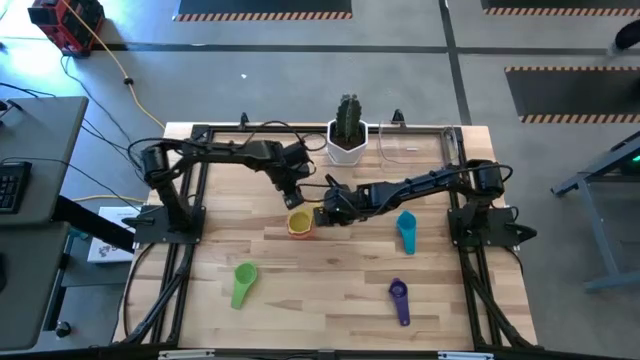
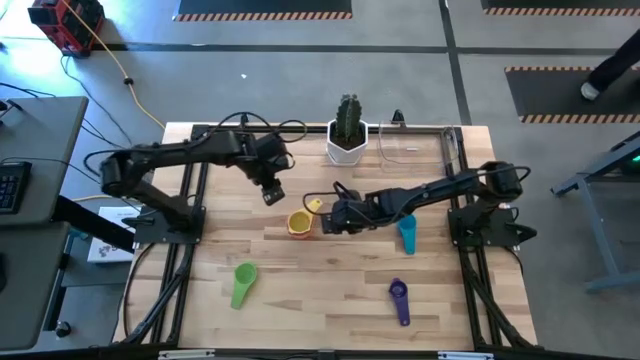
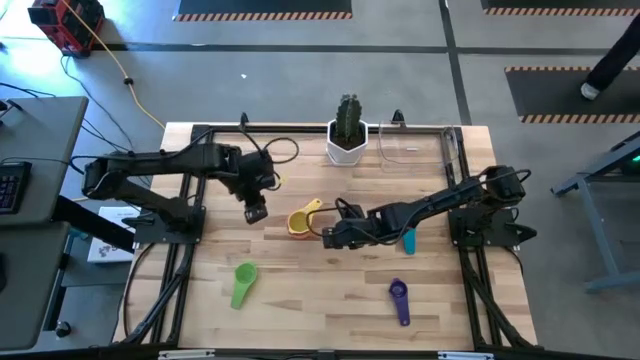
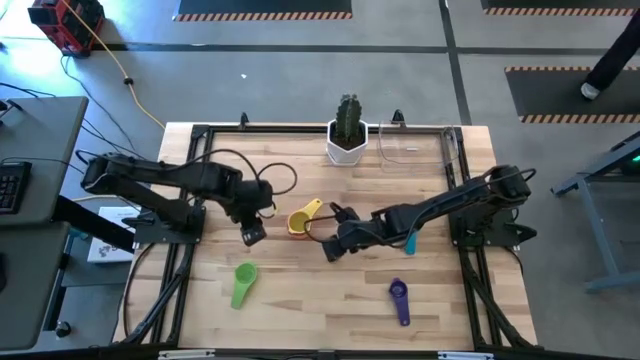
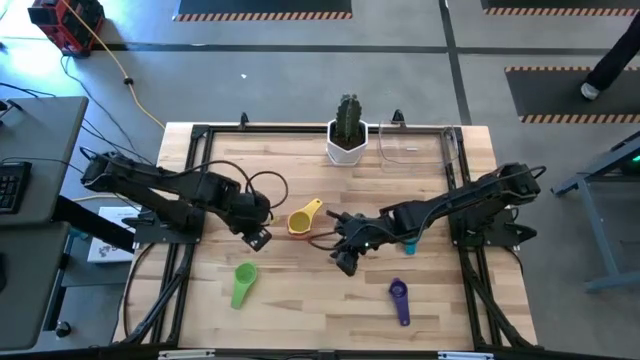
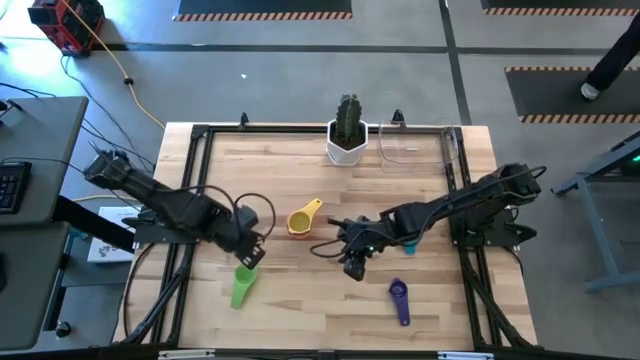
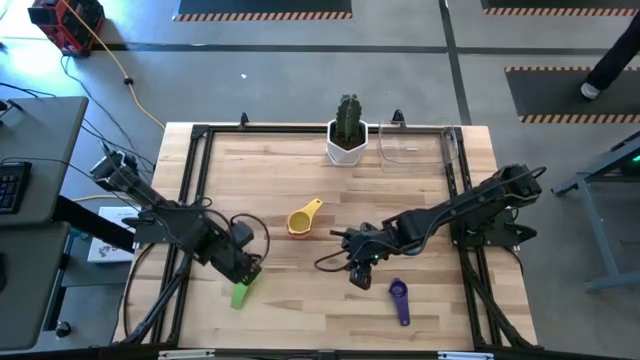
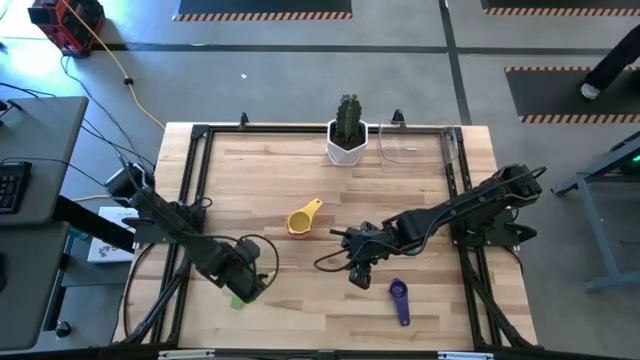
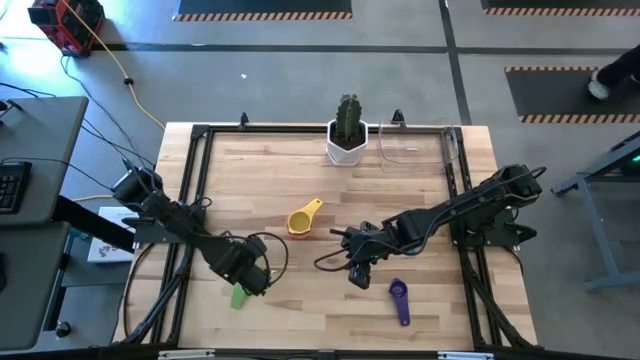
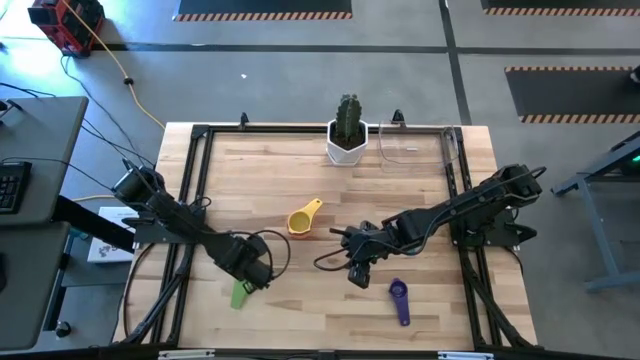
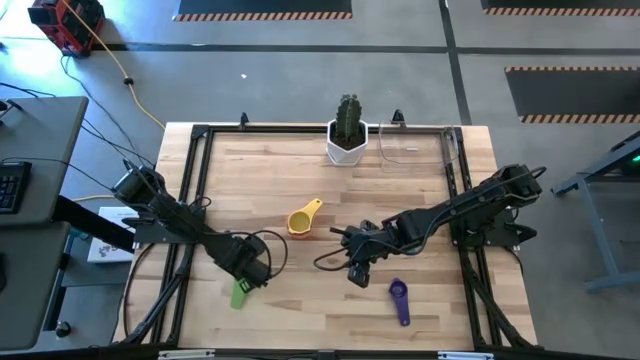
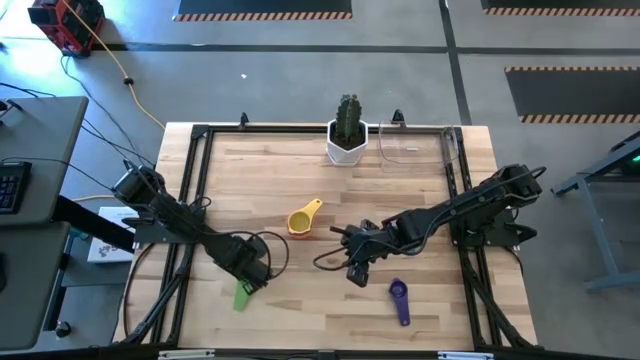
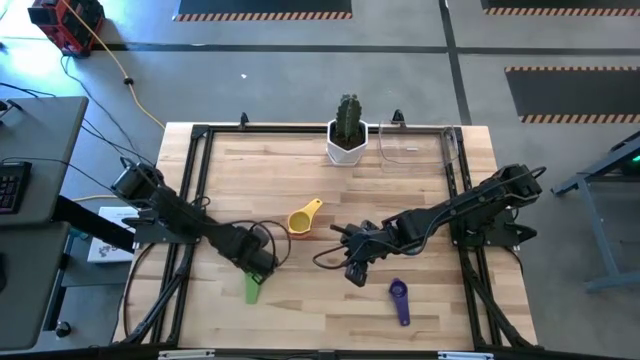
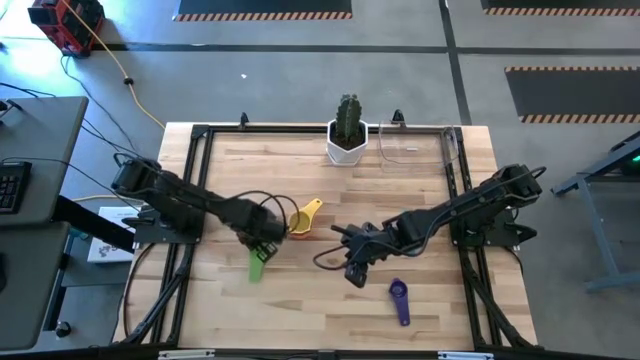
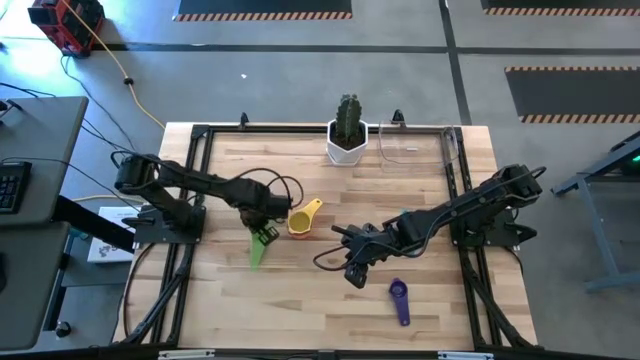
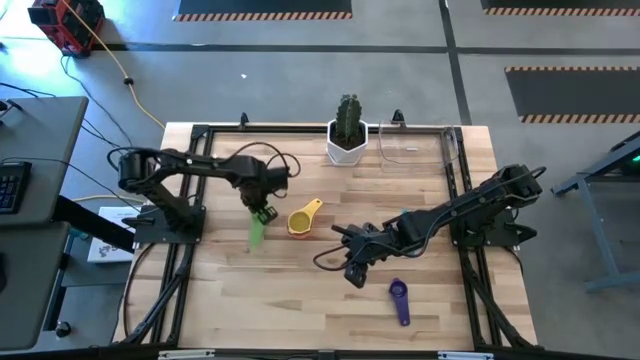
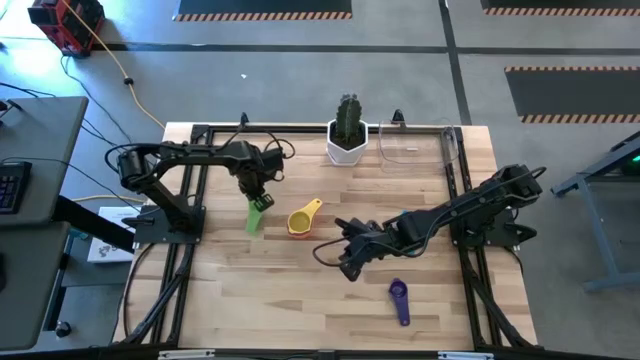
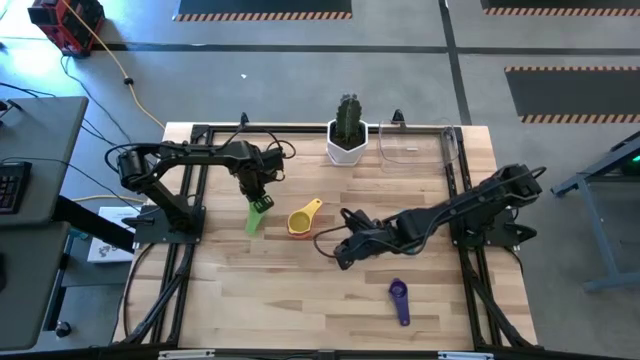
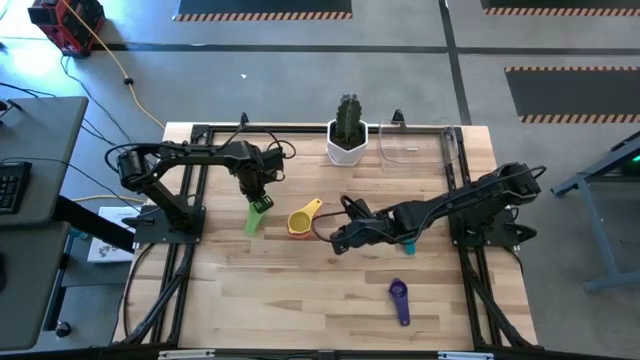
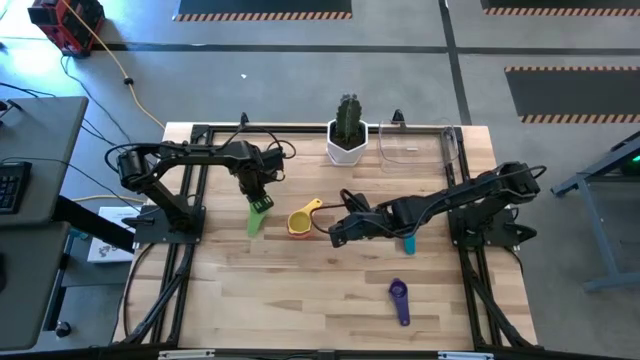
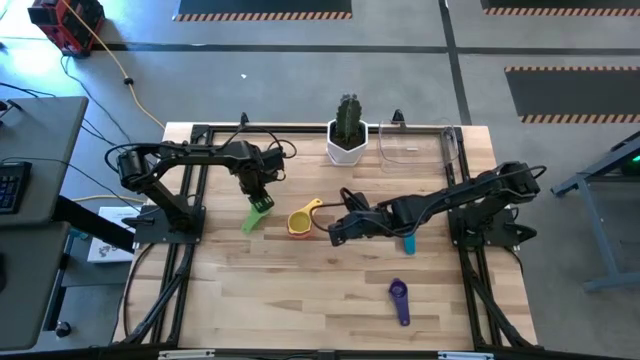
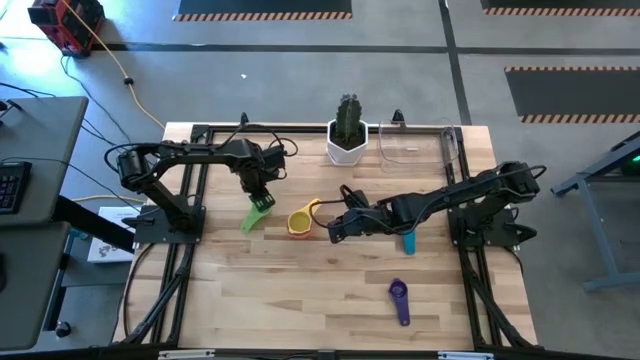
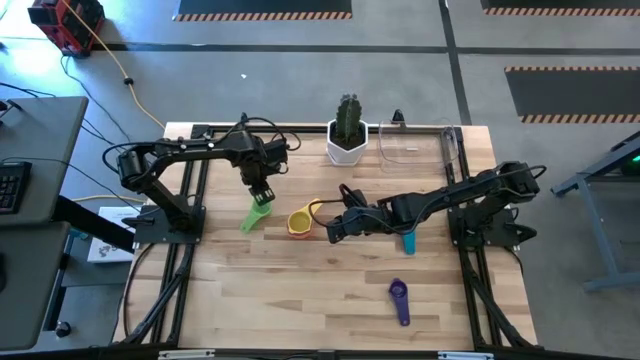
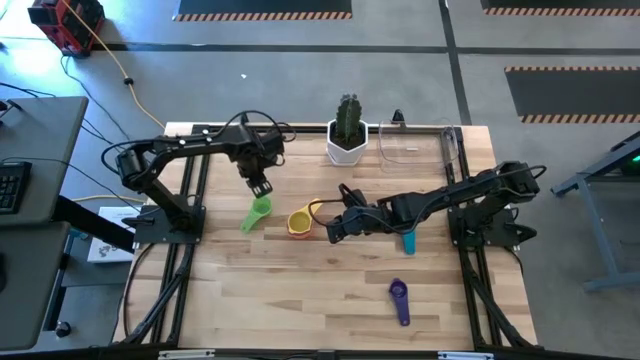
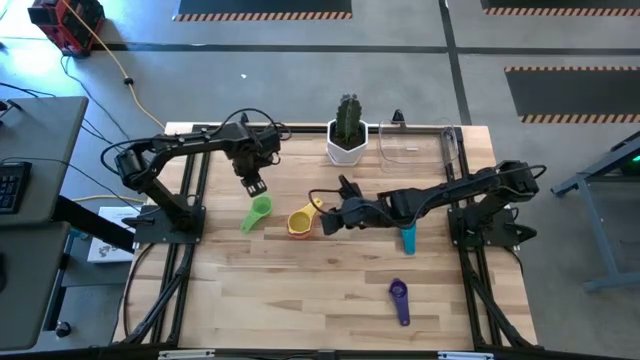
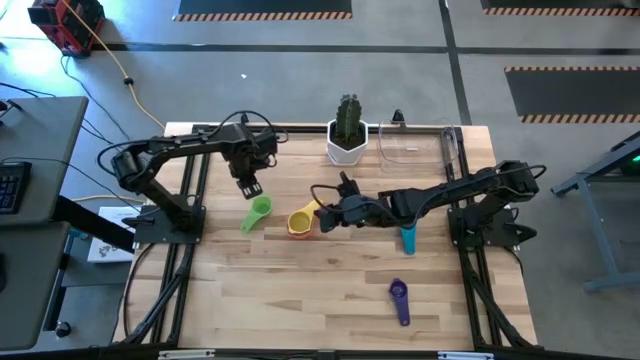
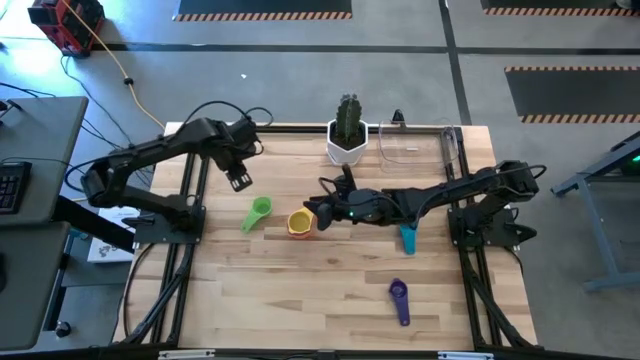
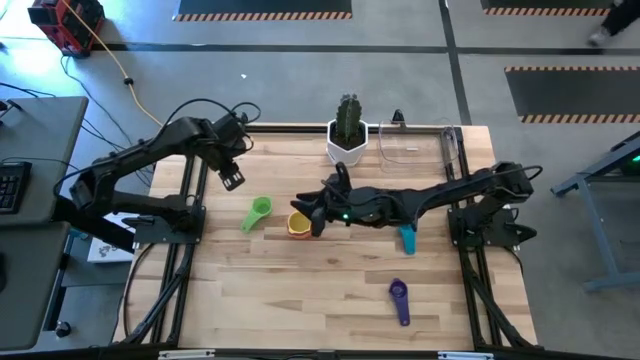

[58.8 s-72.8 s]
Task: Nest measuring cups in basket
Stack the green measuring cup on top of the yellow measuring cup

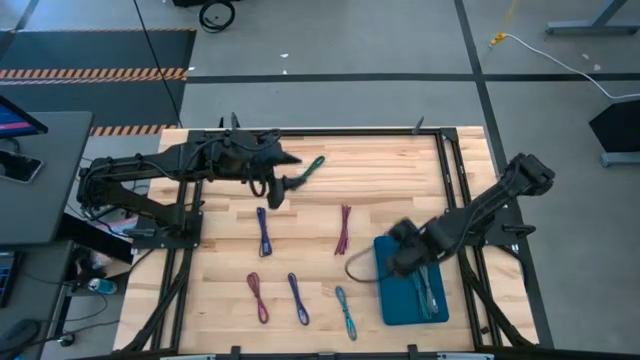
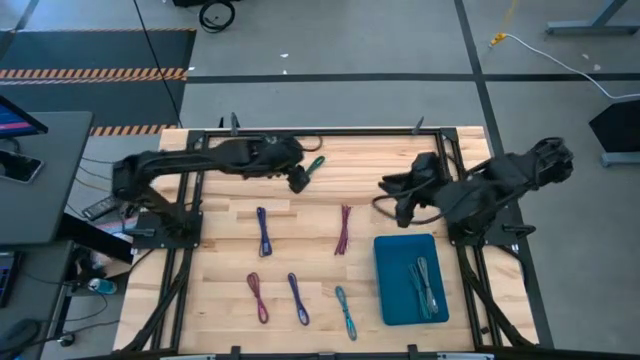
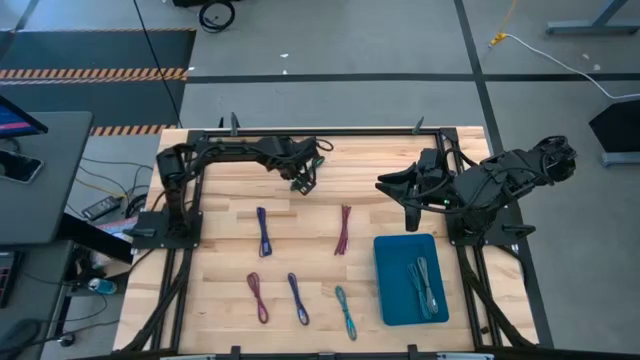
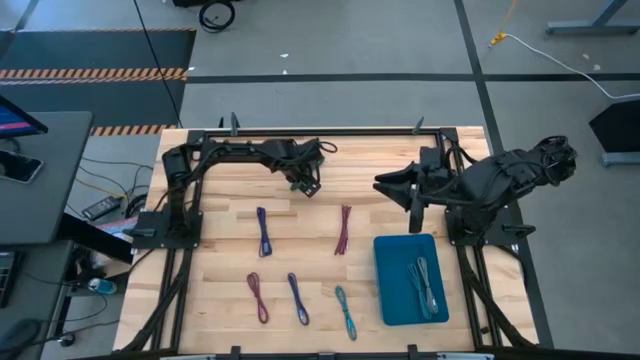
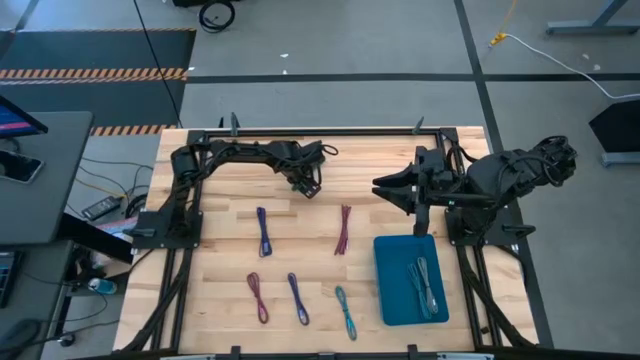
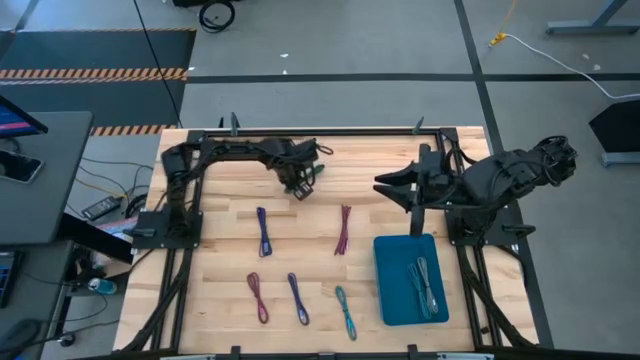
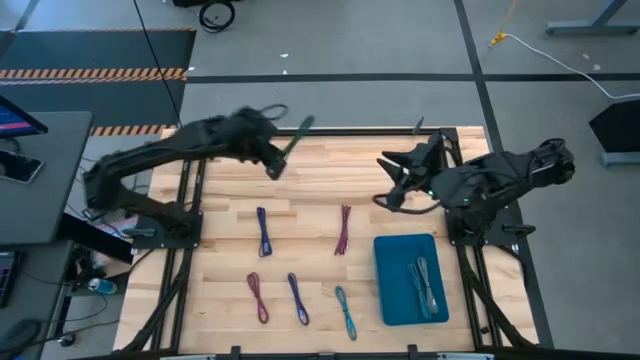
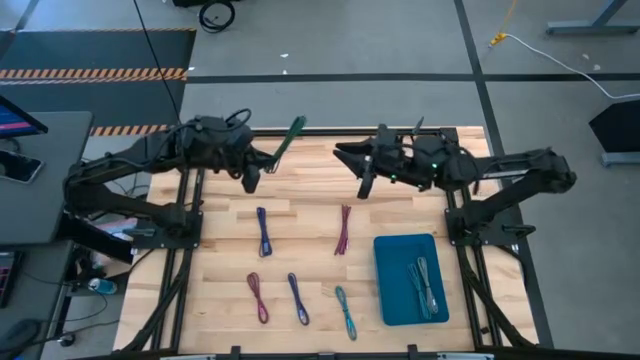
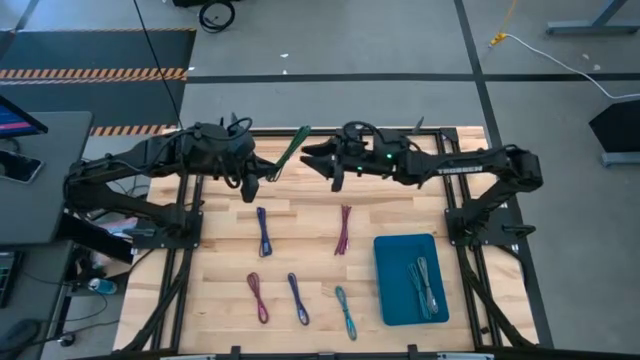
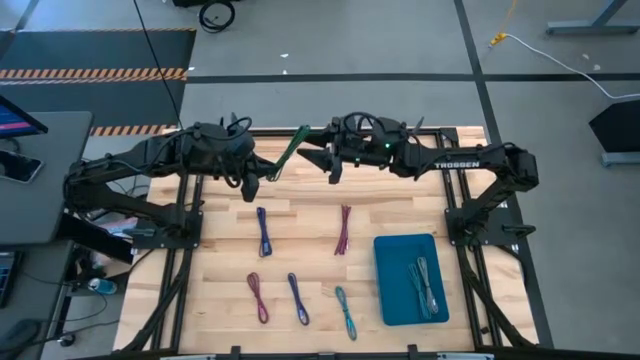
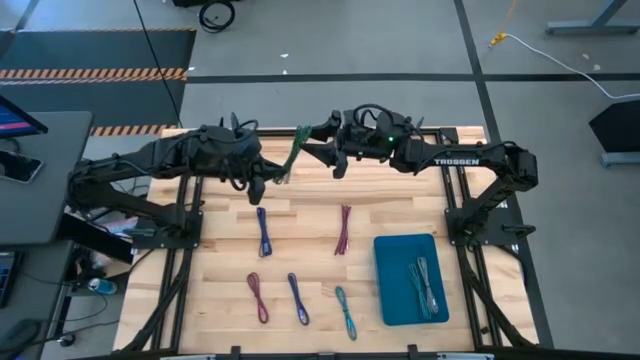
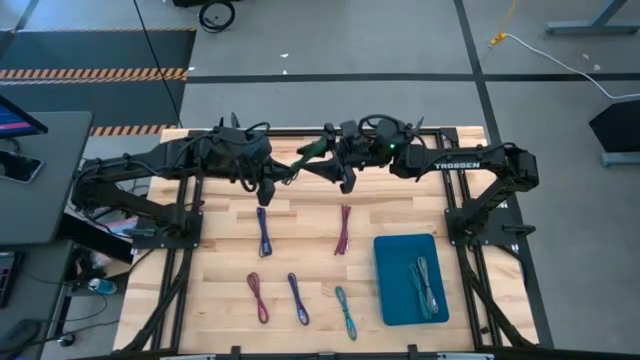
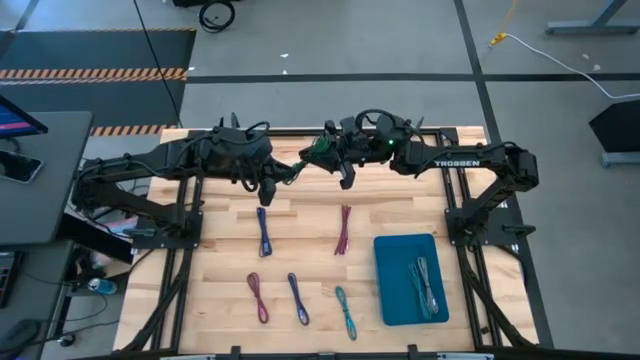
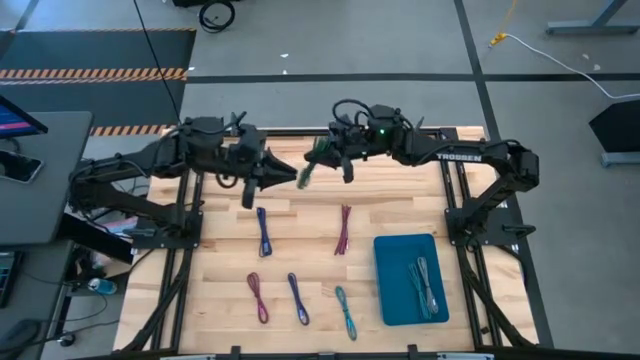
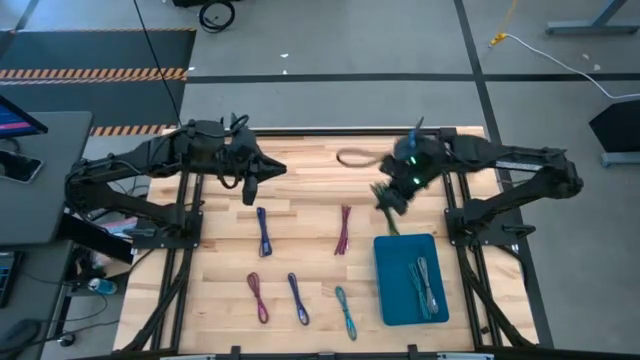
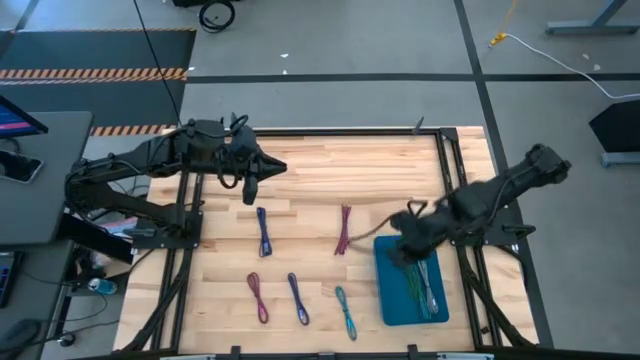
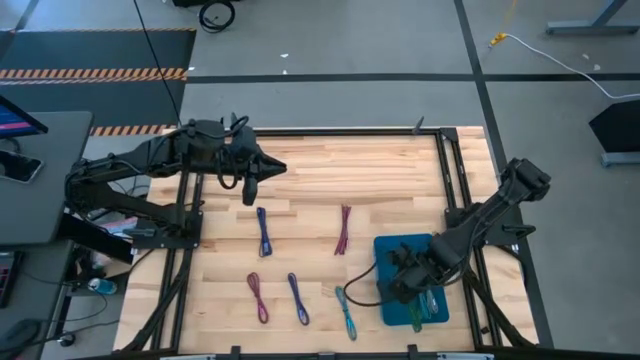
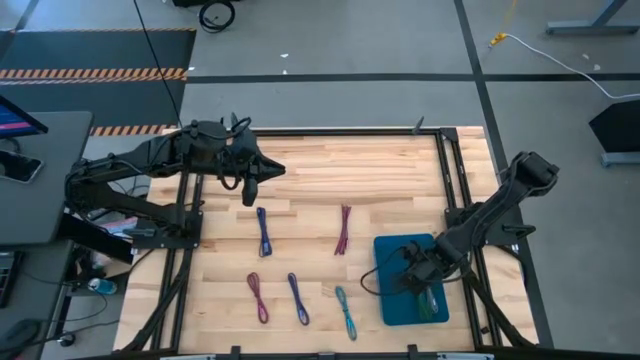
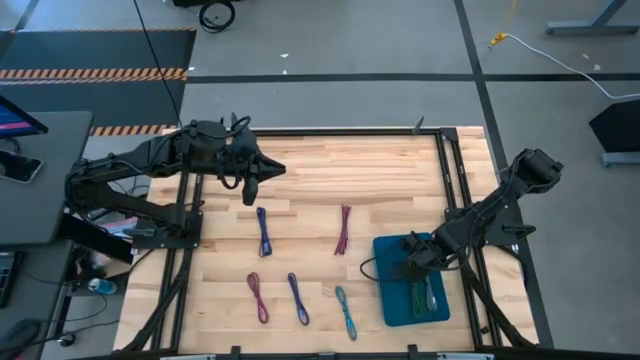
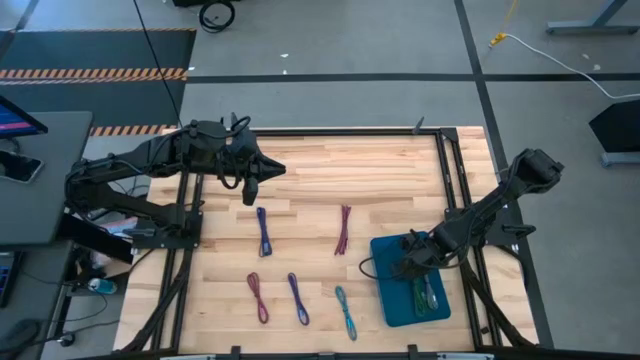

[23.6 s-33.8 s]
Task: Pick and place USB-C Cables
Put the green charger cable into the blue bin
